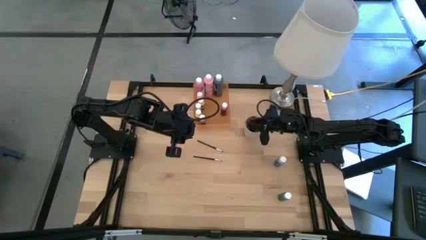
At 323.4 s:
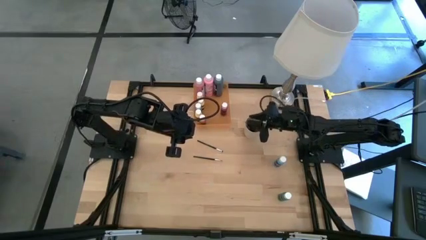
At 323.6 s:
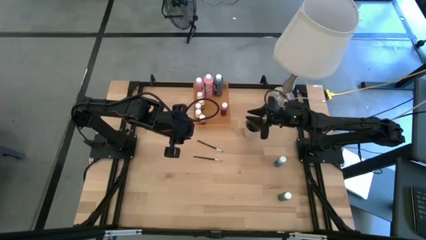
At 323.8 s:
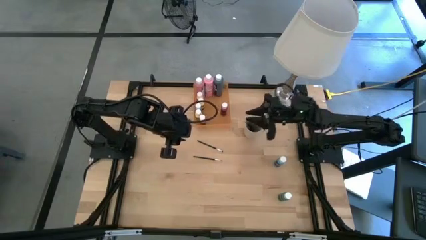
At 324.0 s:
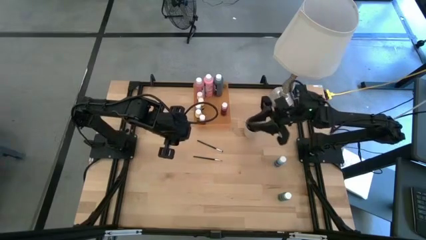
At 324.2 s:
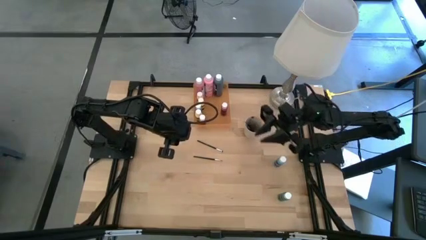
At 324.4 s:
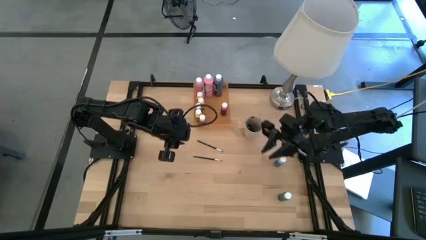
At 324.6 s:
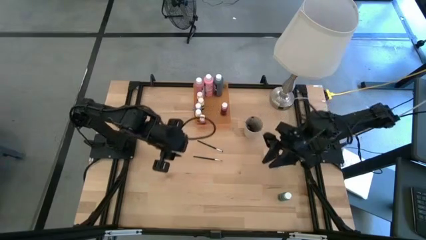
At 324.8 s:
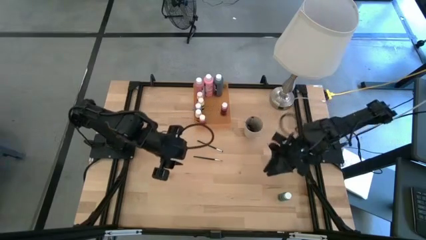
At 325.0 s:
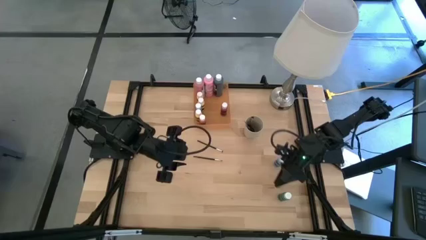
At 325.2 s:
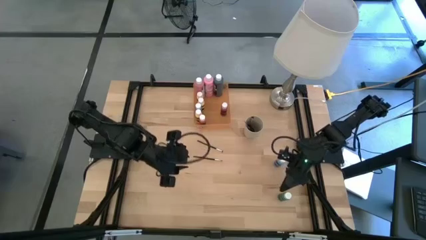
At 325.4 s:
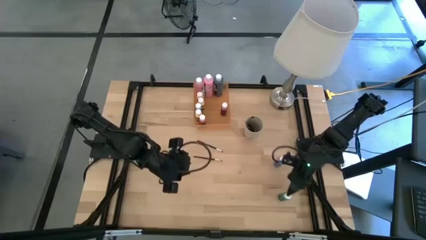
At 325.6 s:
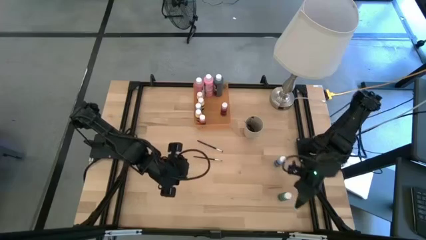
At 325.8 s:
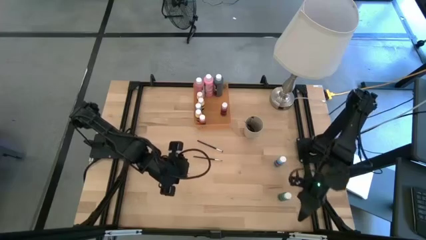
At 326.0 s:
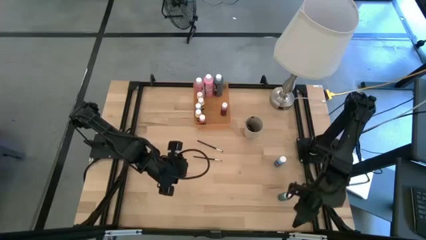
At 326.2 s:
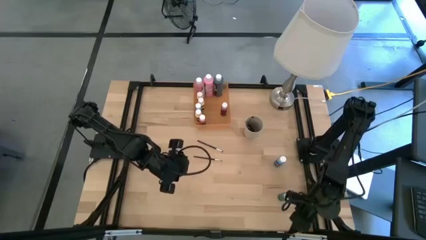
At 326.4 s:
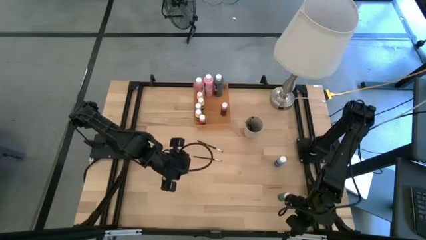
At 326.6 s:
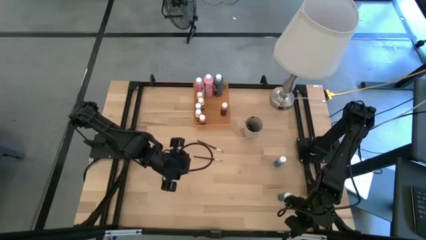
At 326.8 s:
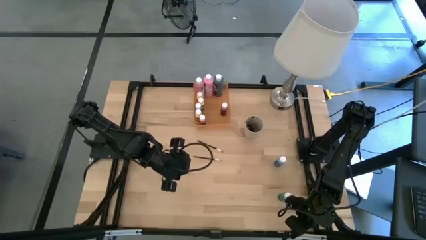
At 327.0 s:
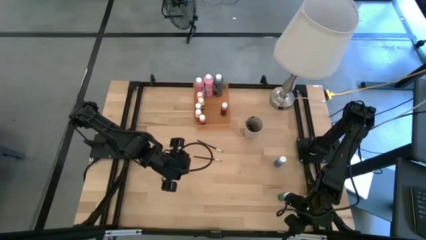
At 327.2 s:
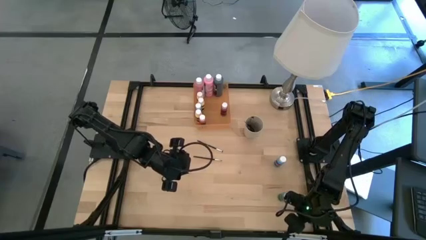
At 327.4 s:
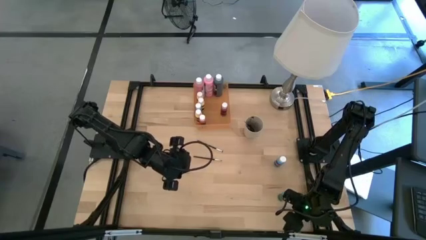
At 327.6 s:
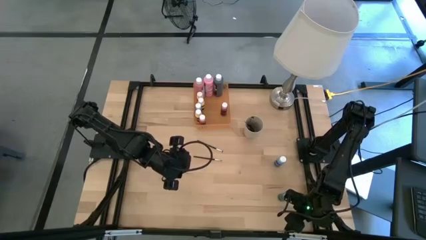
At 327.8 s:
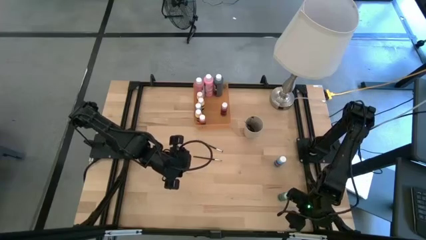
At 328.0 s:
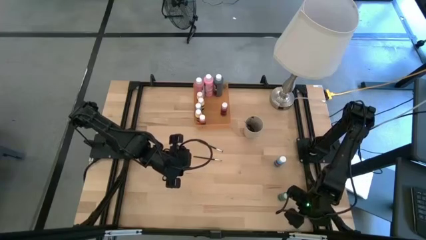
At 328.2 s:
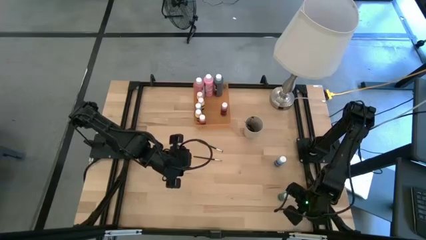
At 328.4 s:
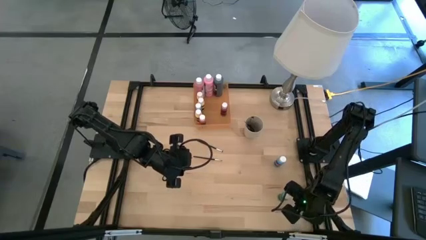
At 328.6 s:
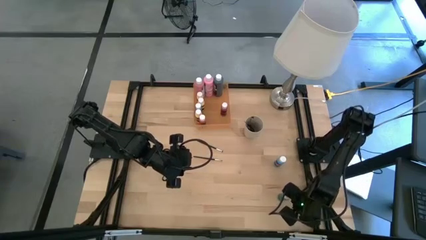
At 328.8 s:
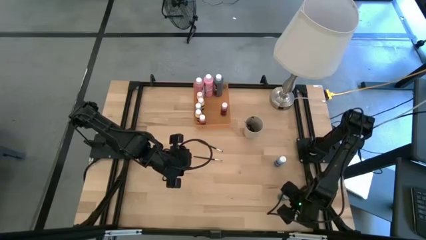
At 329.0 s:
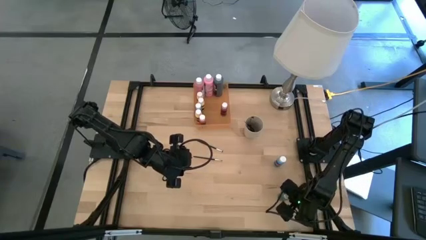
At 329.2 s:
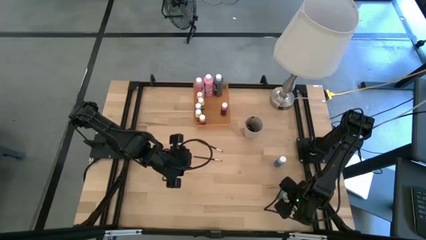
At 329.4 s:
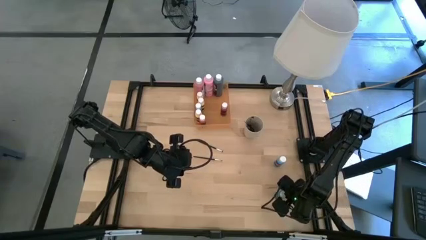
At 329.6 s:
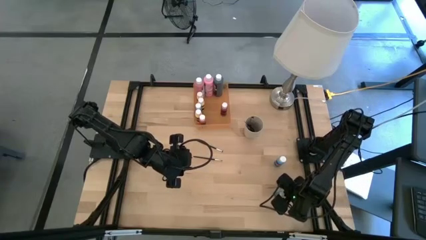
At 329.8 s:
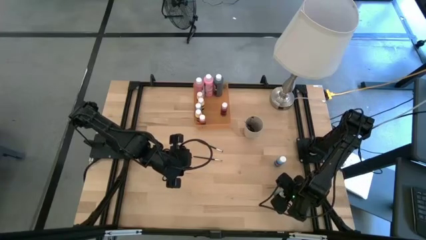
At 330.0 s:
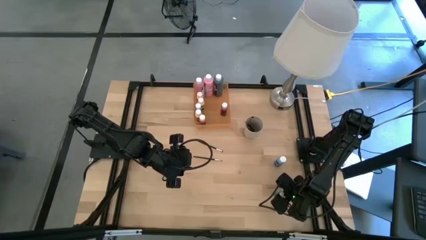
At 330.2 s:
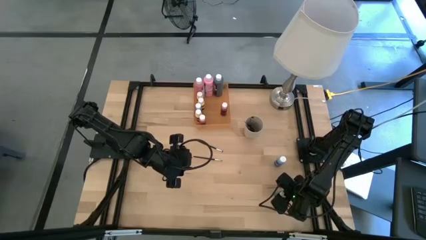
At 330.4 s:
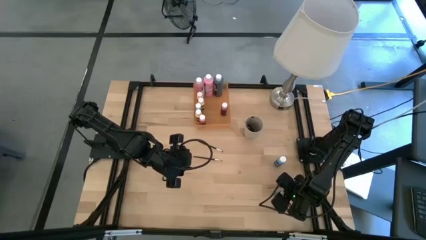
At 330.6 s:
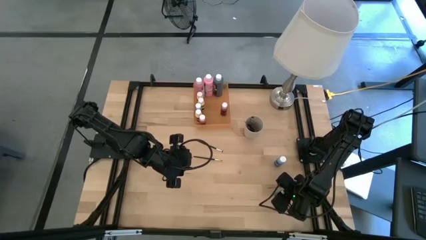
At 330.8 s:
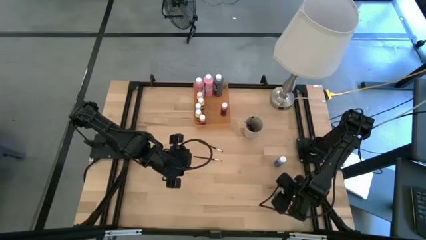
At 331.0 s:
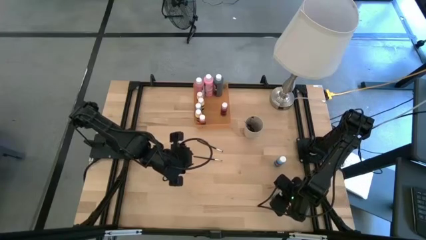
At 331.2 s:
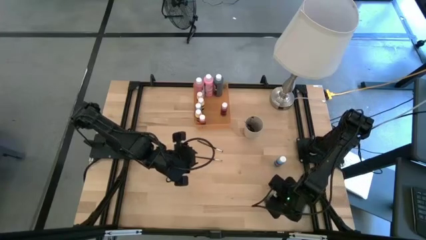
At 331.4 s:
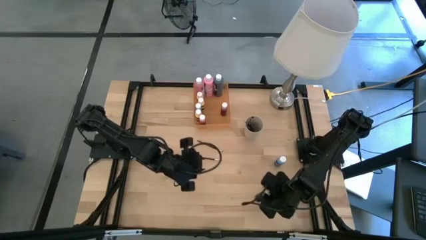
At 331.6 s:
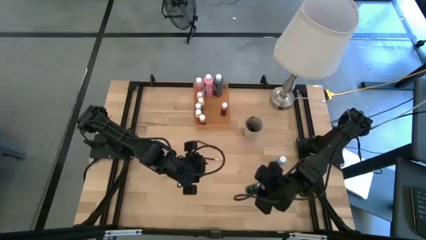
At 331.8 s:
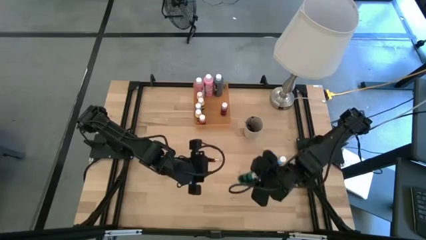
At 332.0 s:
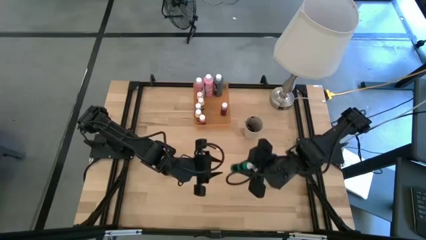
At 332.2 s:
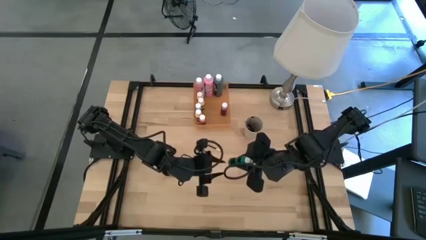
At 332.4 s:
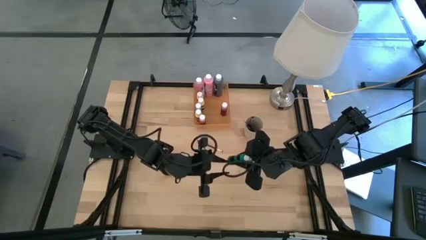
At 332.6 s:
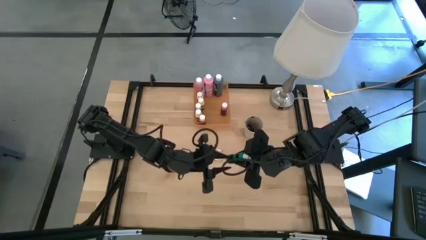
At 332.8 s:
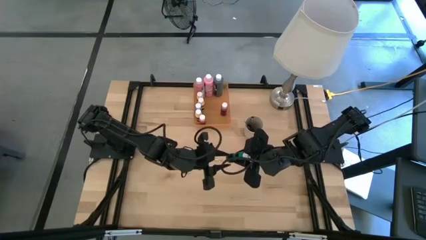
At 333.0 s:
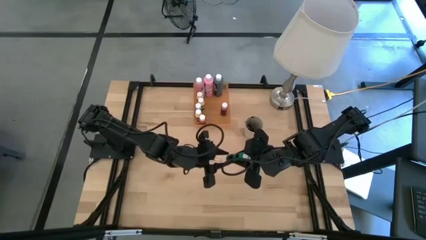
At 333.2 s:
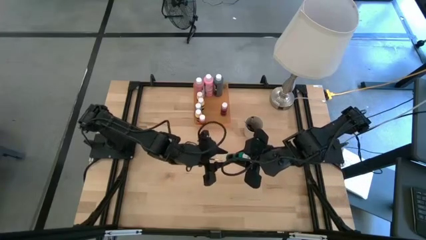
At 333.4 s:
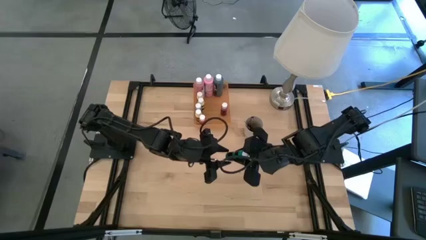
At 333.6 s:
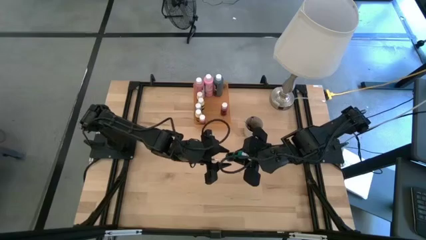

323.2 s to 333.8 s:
Task: Pick & Place Paint Supplies
Put the green paint bottle into the orange bin

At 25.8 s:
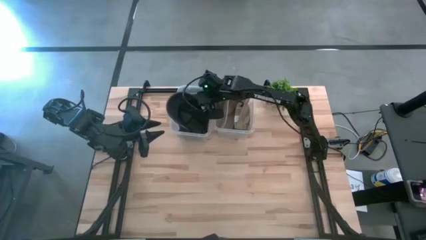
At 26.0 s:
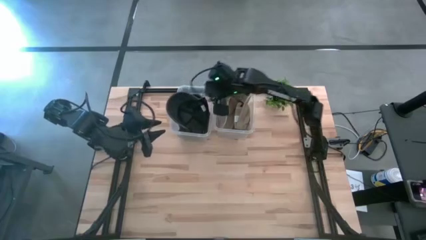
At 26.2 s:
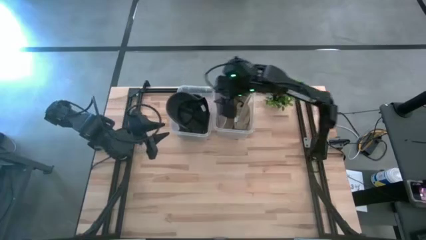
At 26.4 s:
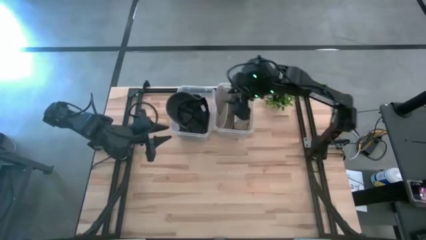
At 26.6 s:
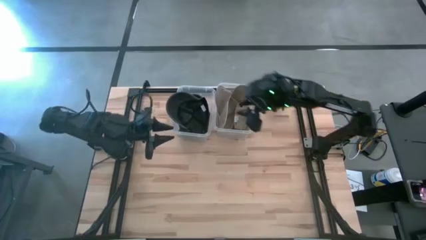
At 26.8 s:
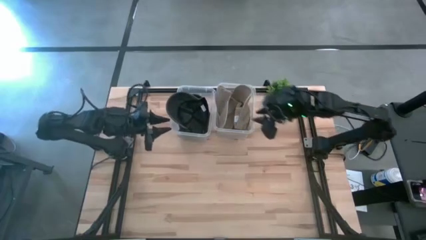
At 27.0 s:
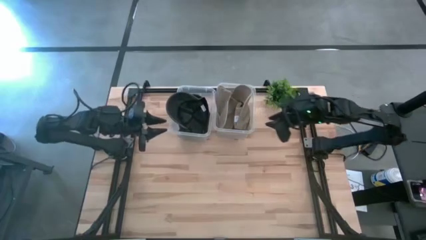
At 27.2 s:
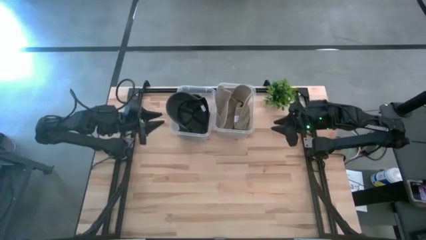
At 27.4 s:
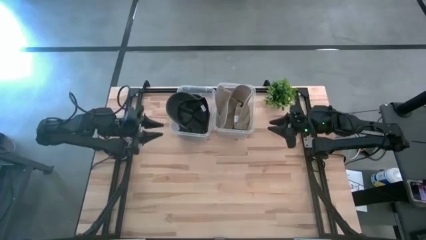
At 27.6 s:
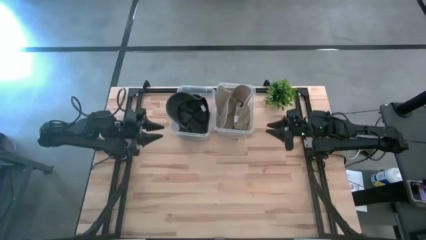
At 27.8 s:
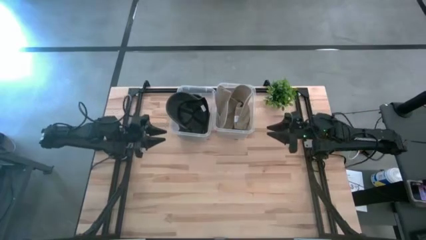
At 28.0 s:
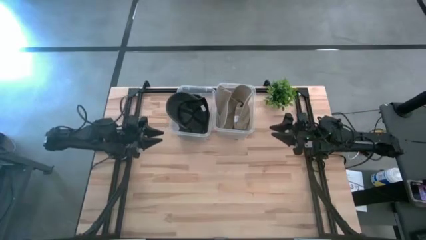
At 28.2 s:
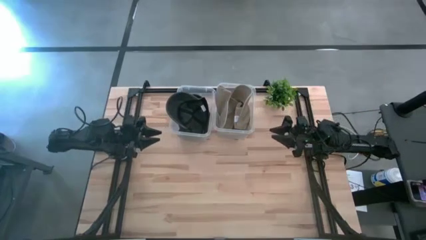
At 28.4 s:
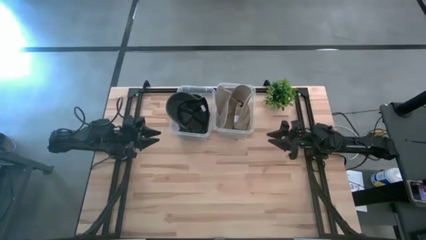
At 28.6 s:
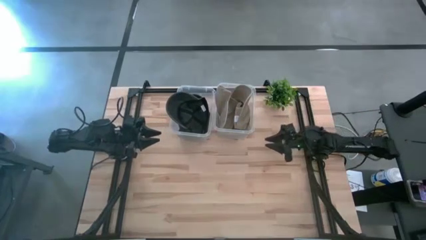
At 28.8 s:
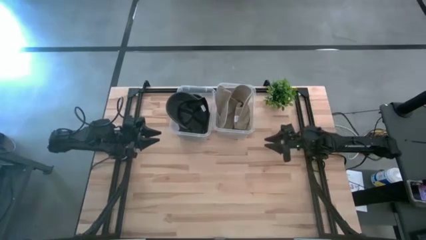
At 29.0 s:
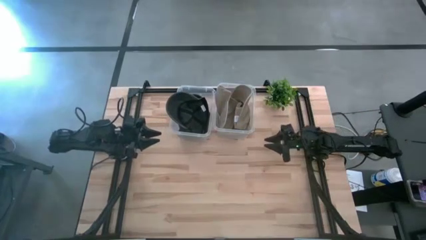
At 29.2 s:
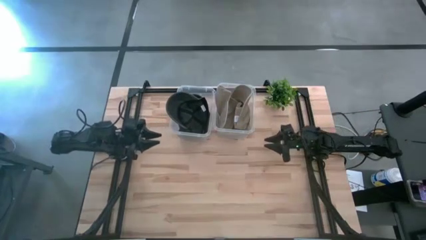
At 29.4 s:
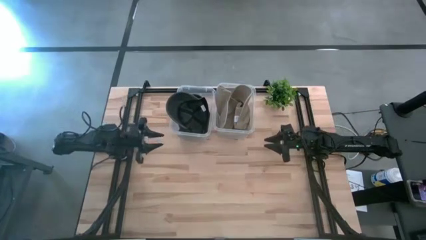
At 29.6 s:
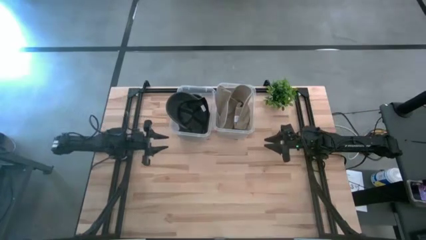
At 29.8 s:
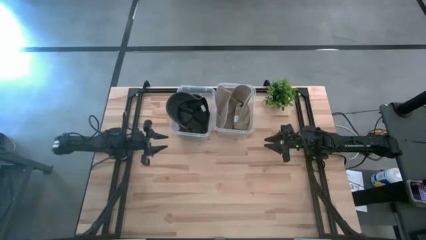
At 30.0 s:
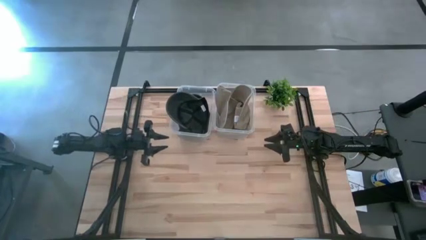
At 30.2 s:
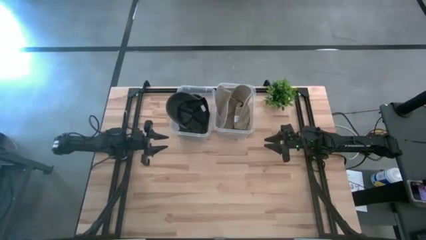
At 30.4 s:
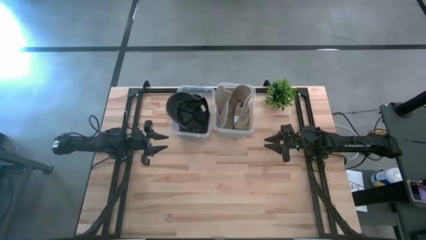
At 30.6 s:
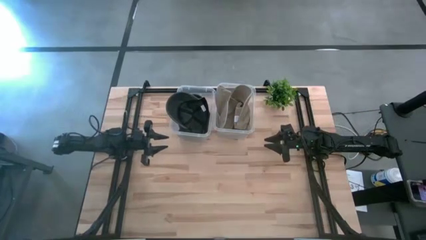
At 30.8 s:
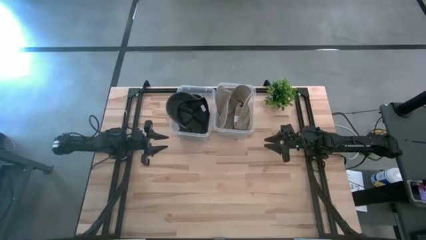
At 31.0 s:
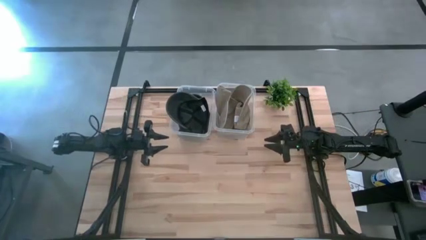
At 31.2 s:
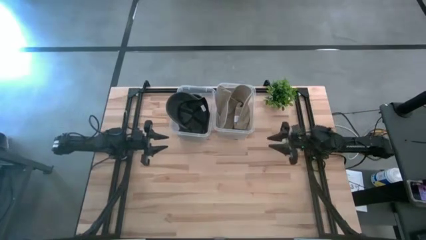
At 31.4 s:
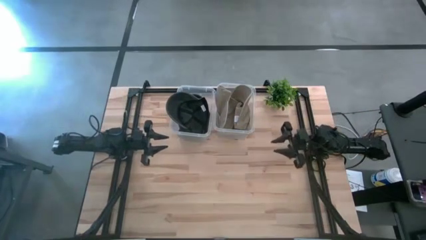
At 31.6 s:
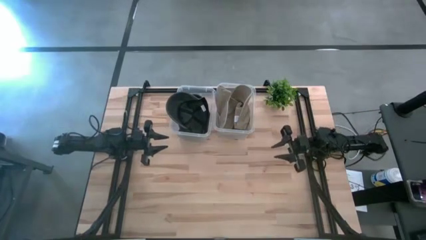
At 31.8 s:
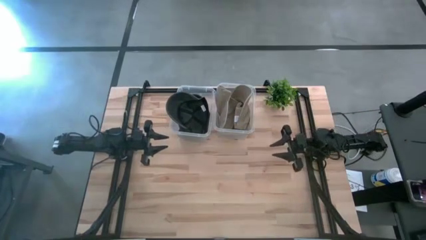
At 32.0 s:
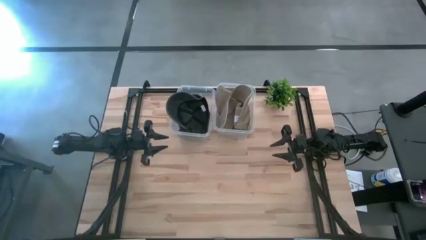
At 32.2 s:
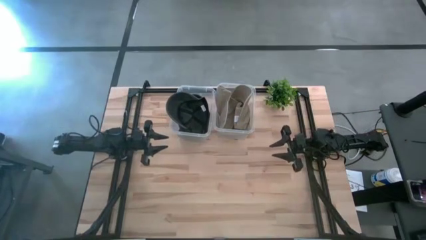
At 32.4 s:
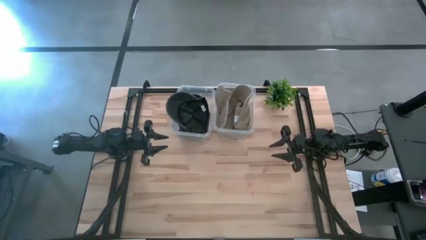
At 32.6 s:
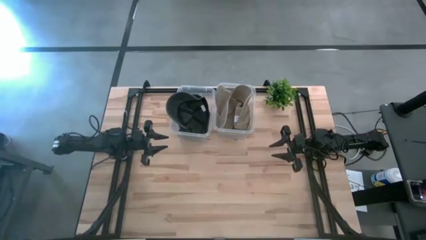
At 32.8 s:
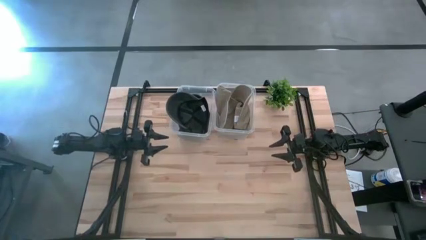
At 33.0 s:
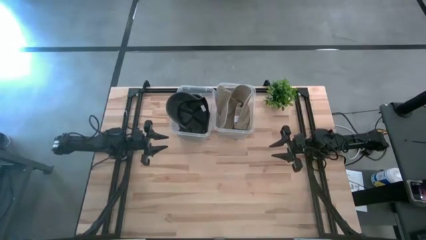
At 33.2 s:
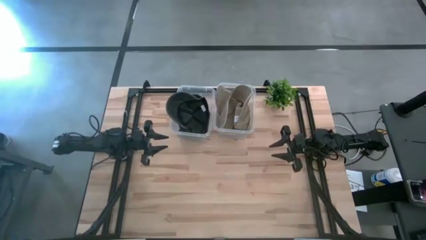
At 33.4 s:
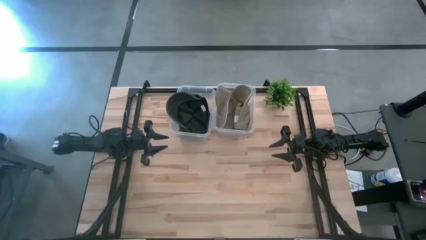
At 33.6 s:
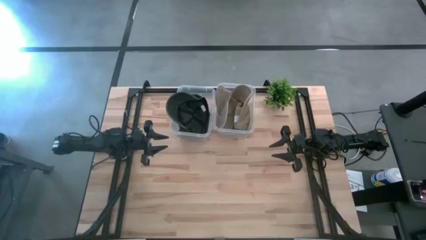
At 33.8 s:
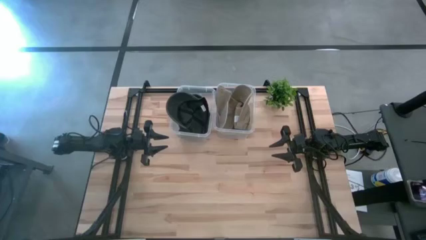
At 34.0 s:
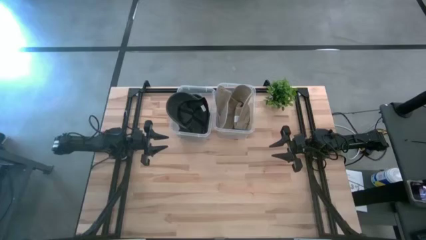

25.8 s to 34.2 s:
Task: Pick & Place hat
Return To Home Position
